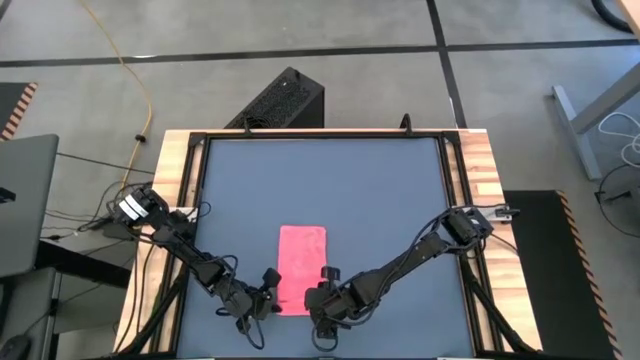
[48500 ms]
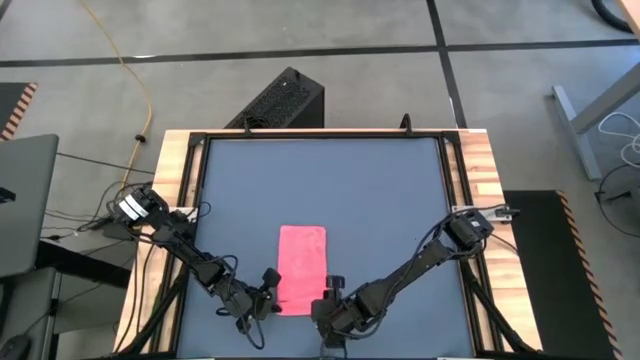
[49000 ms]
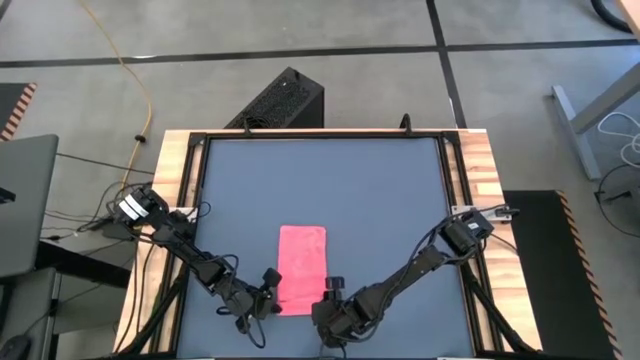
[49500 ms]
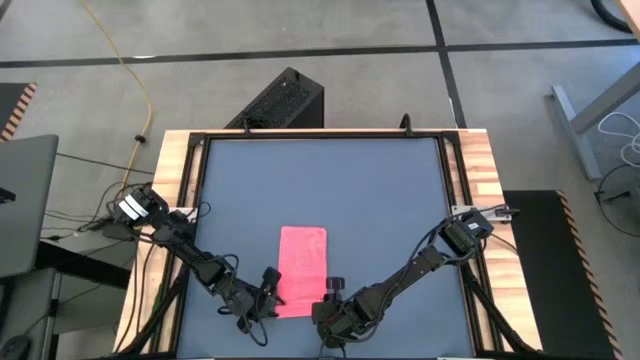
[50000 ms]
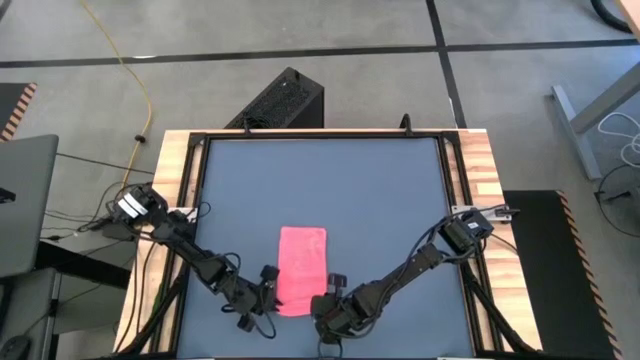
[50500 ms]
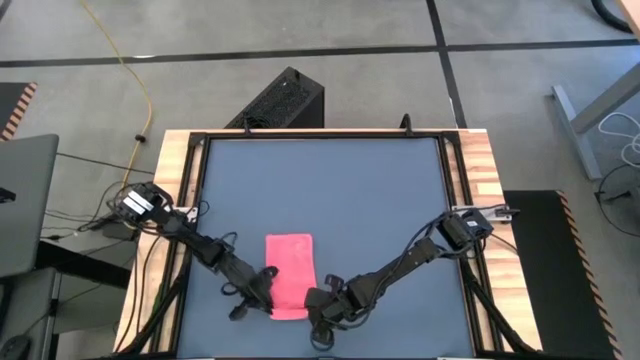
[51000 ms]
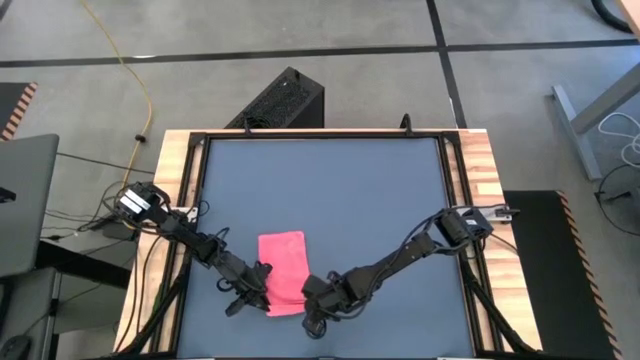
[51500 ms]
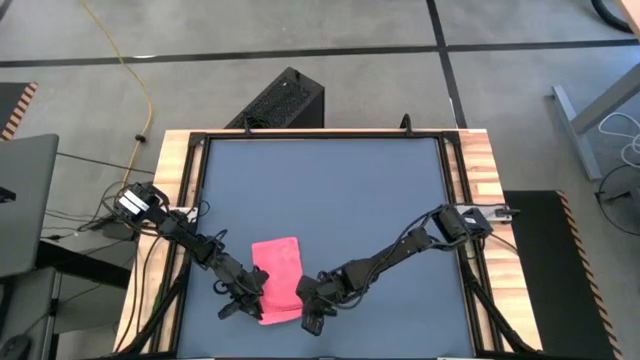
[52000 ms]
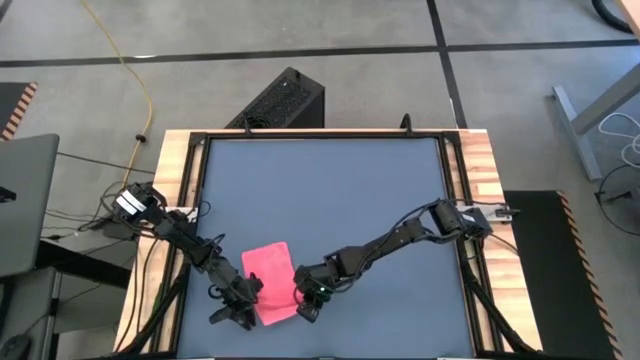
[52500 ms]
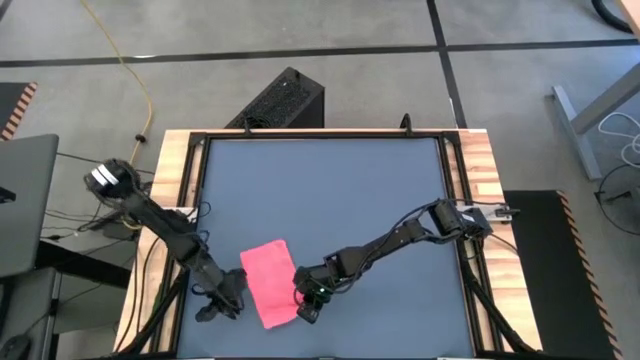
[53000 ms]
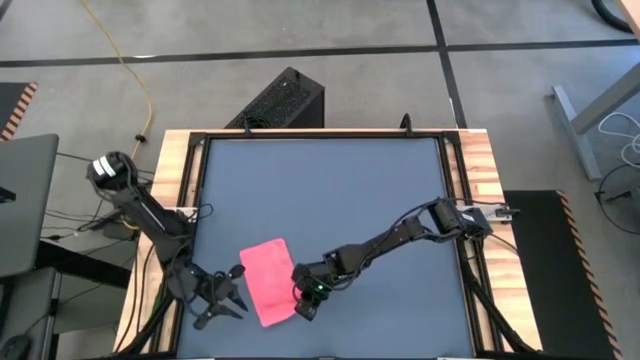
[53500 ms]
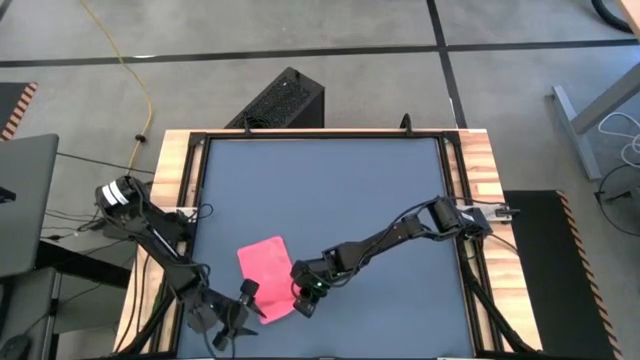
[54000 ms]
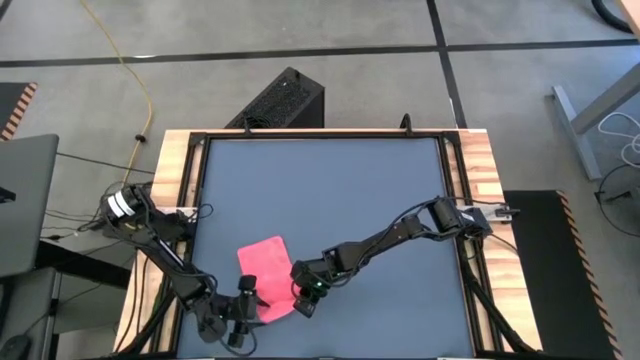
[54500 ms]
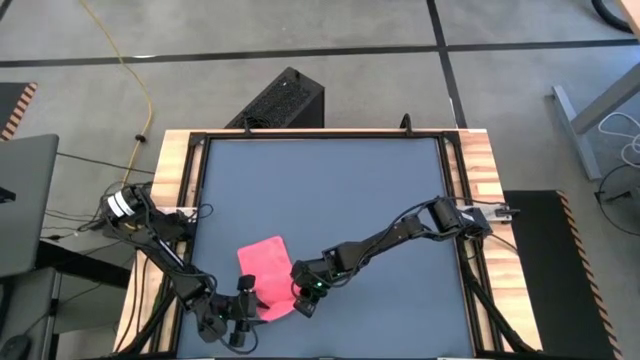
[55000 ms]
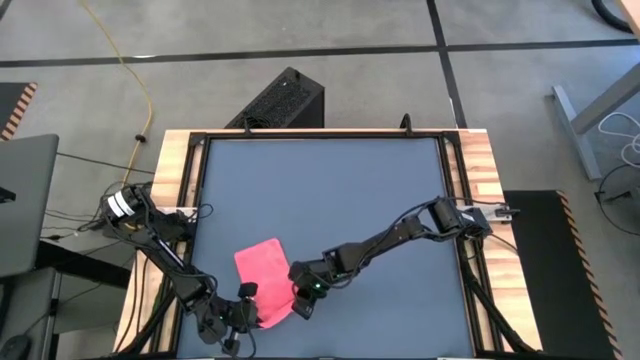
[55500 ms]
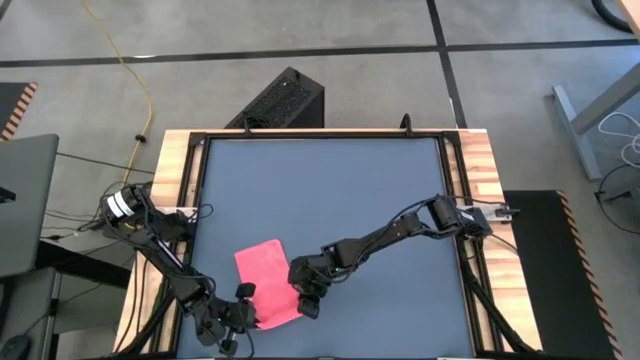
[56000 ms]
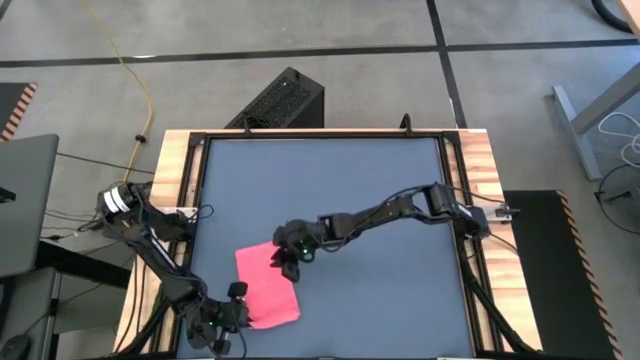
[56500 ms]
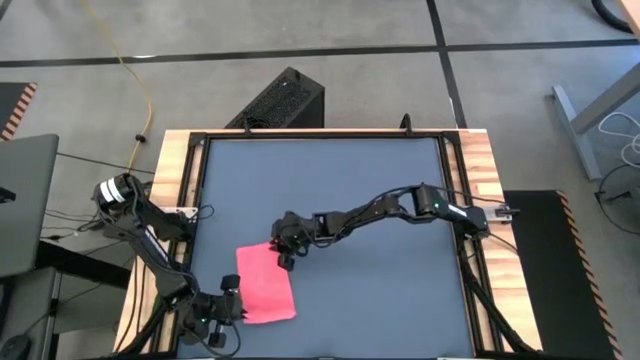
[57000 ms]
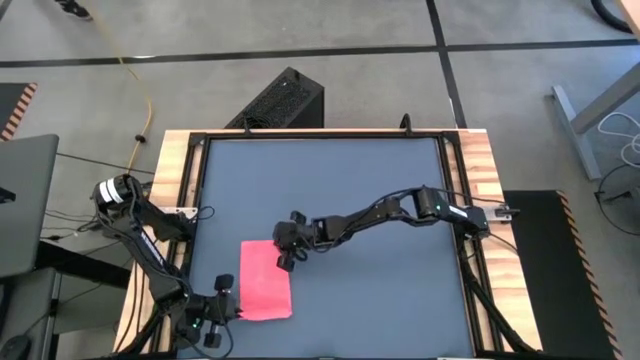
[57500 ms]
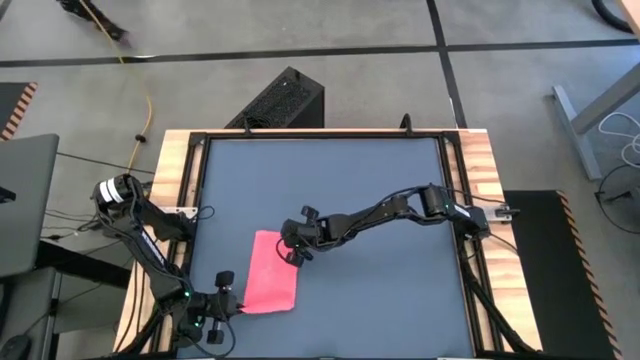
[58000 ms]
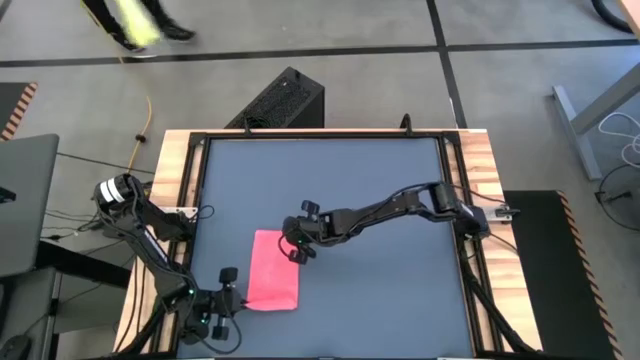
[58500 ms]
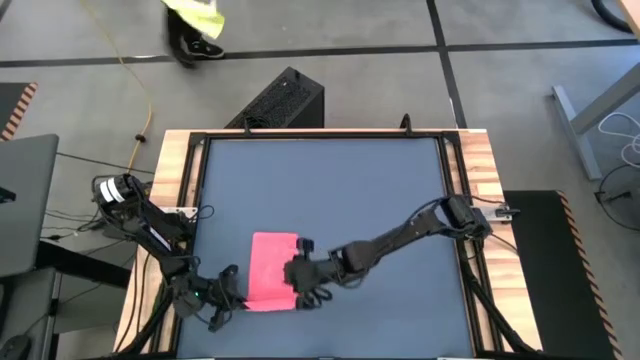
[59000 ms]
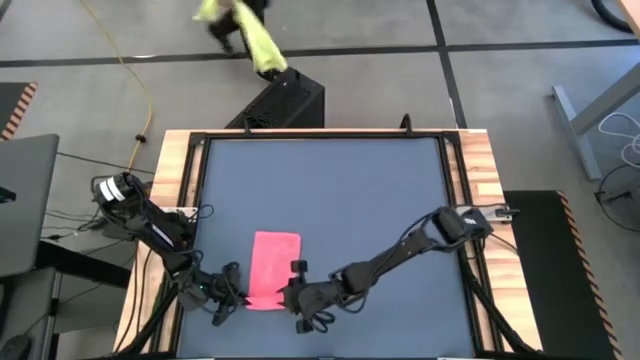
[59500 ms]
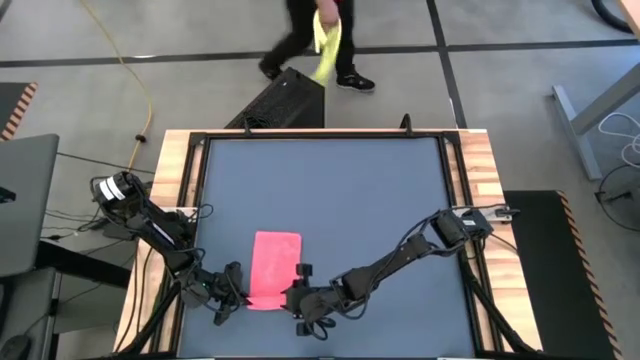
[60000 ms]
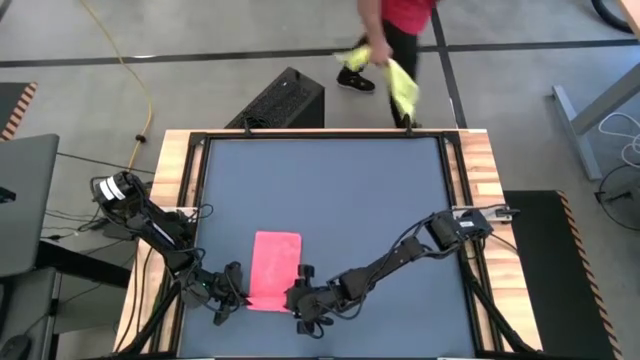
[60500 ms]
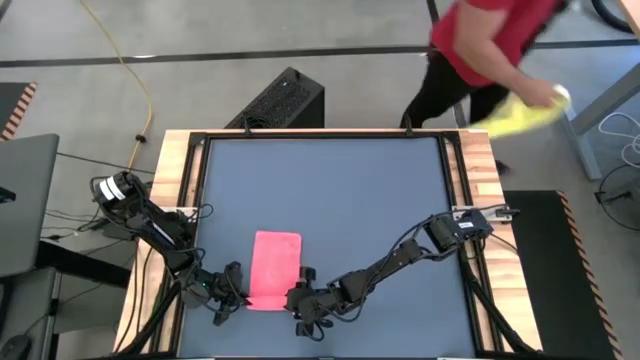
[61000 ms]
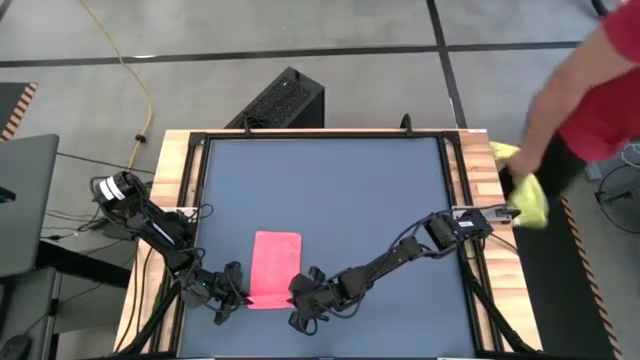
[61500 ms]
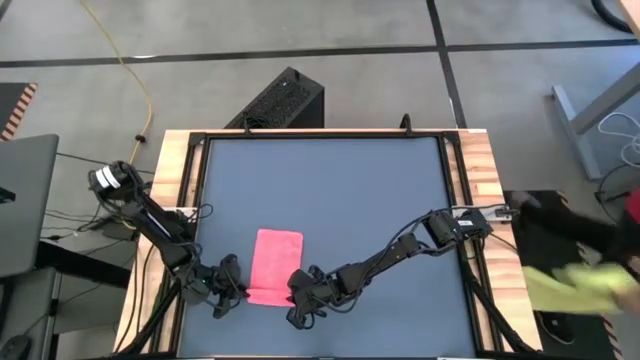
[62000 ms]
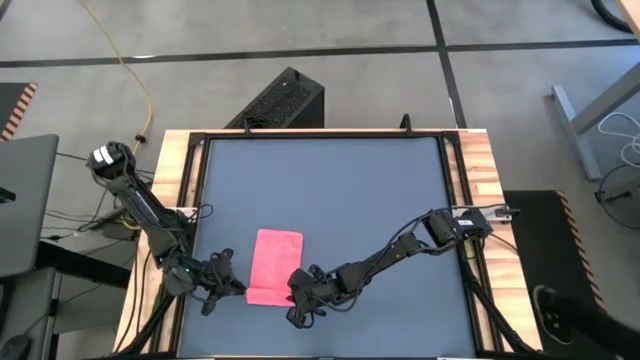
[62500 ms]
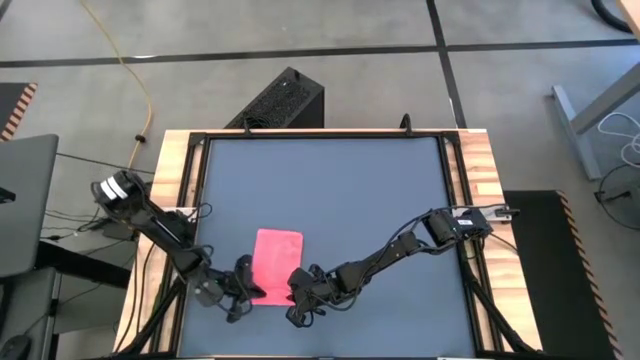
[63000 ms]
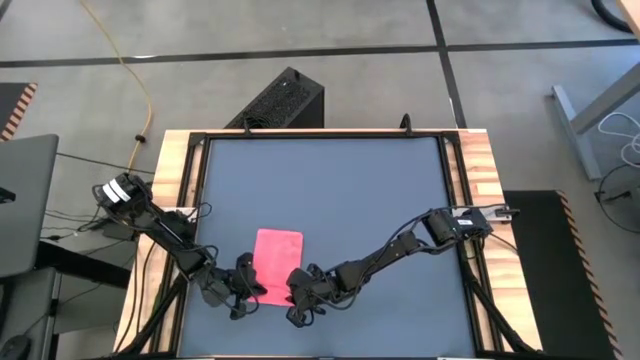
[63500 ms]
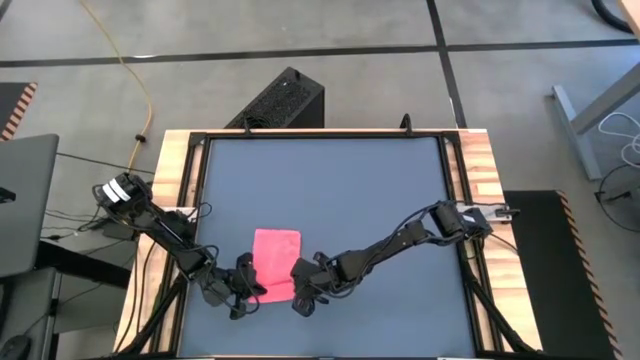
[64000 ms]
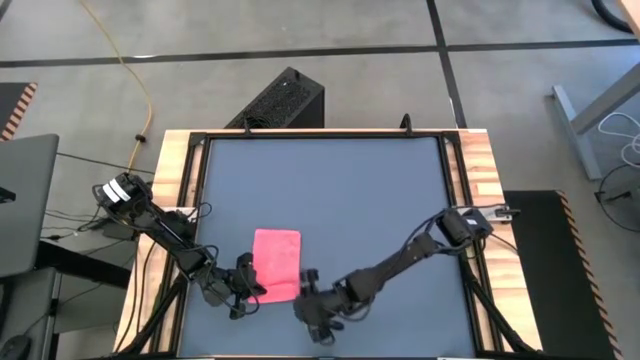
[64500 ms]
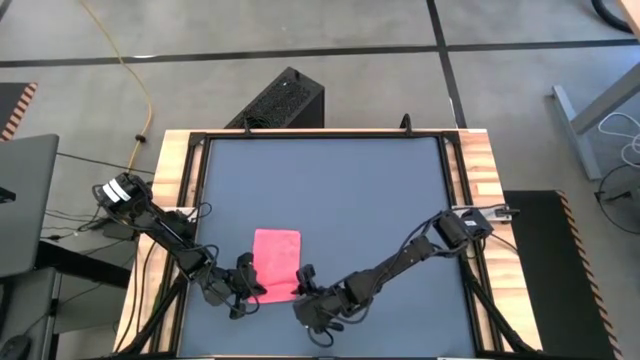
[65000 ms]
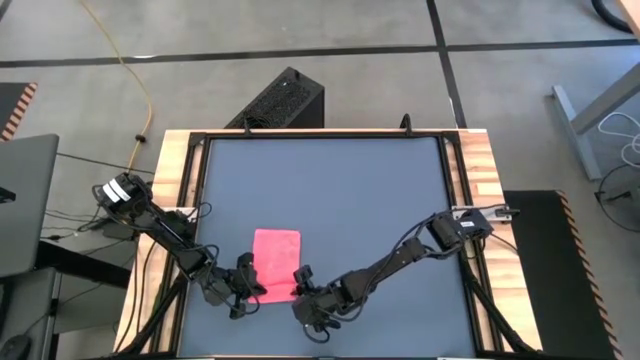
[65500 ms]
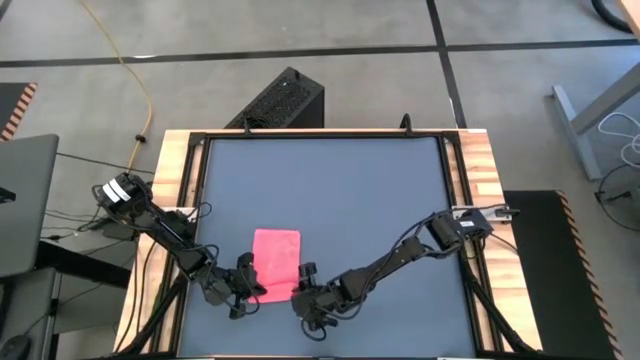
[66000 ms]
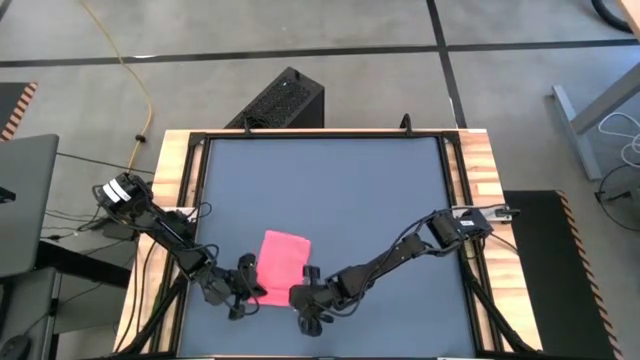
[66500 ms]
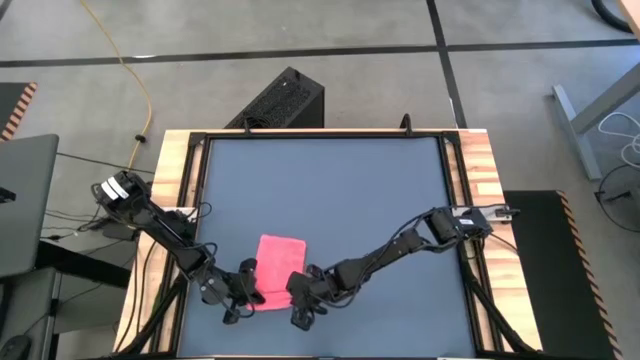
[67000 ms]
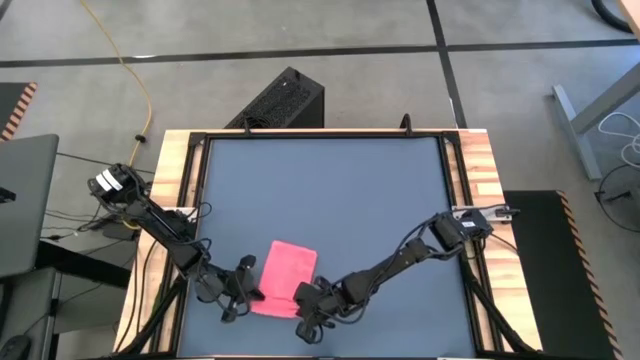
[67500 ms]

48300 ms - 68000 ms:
Task: Roll towel
Roll the pink towel

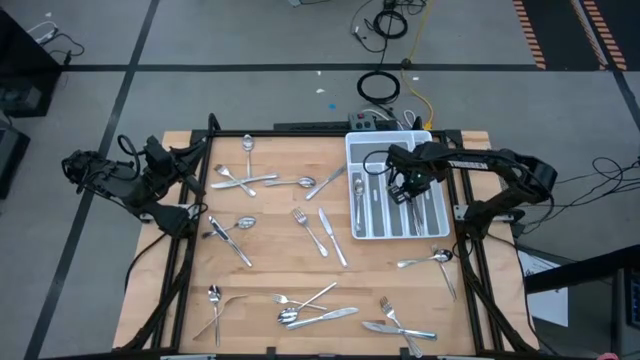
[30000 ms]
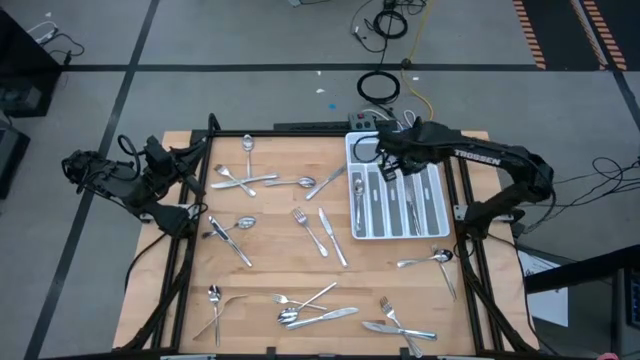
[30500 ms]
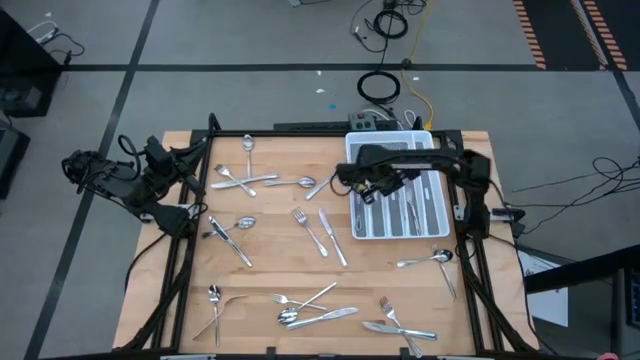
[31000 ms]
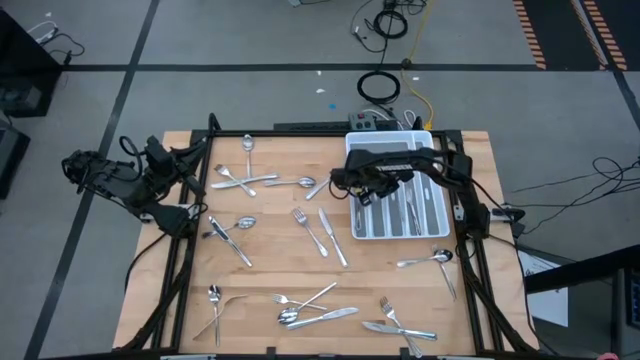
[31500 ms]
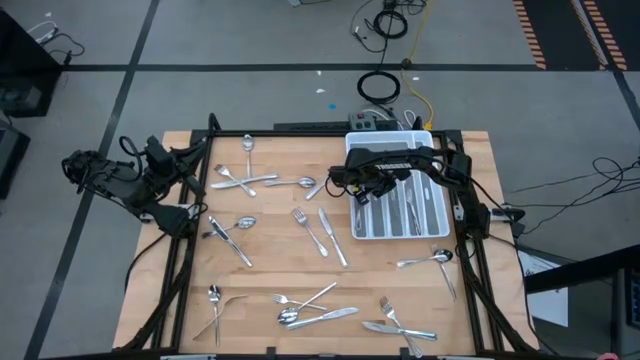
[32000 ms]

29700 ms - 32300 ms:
Task: Sort silverware
Put the silver fork into the white silverware tray
